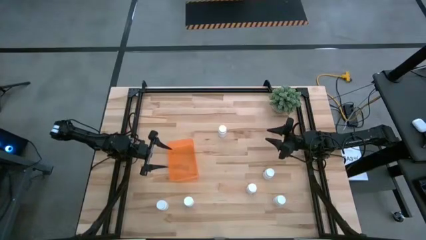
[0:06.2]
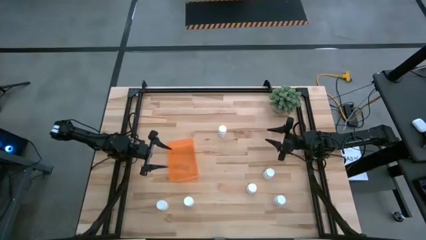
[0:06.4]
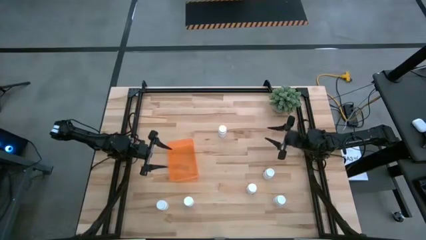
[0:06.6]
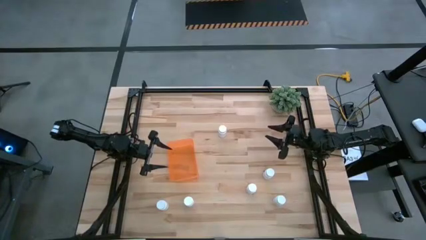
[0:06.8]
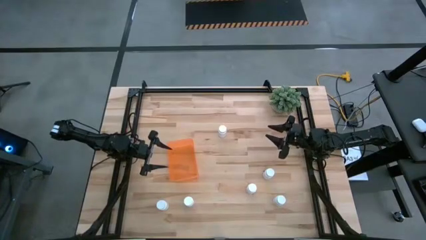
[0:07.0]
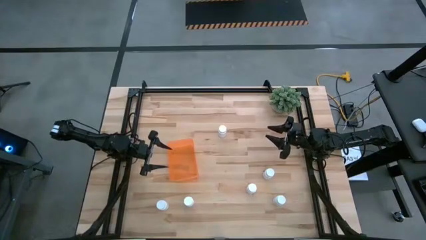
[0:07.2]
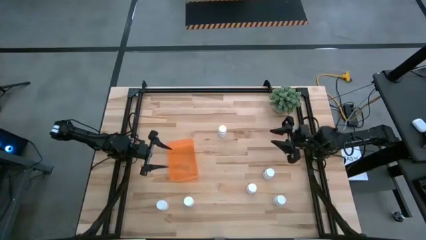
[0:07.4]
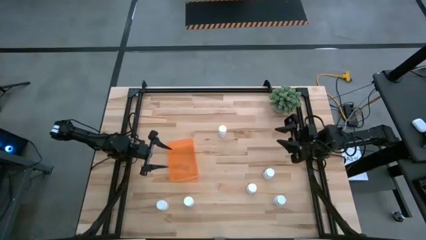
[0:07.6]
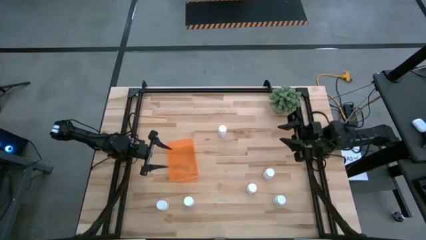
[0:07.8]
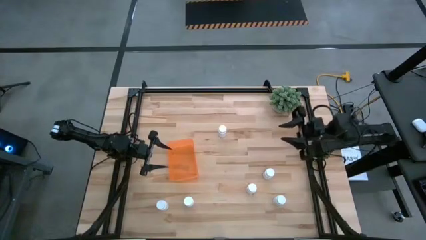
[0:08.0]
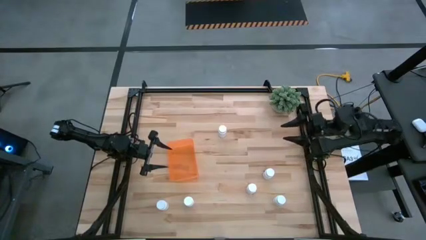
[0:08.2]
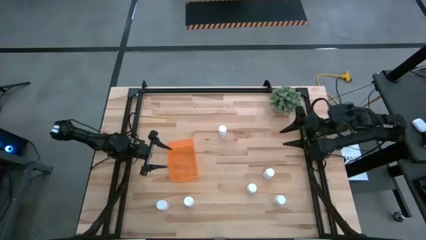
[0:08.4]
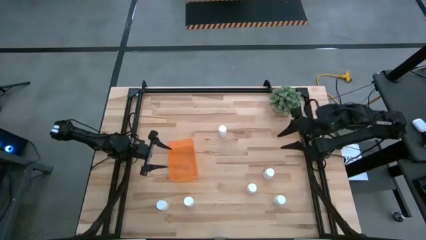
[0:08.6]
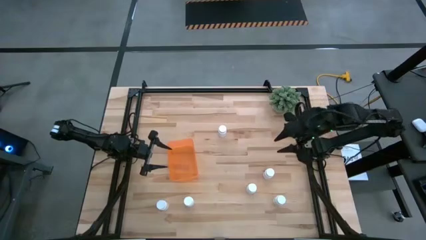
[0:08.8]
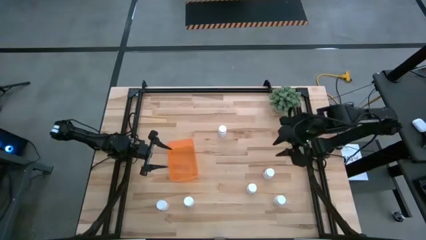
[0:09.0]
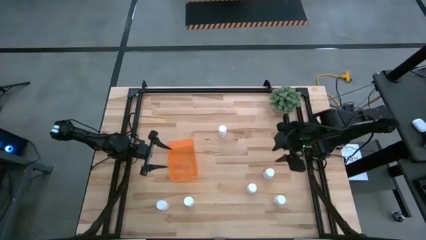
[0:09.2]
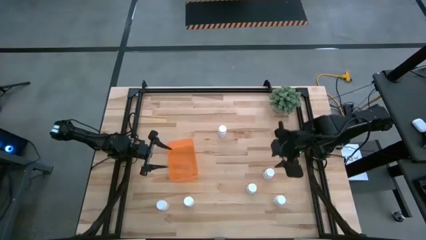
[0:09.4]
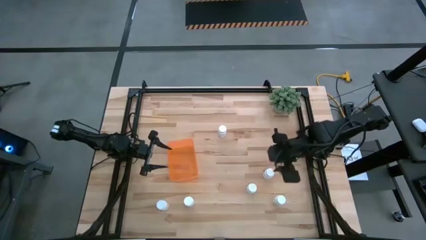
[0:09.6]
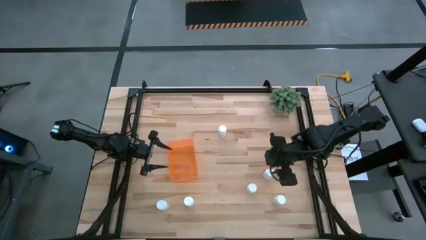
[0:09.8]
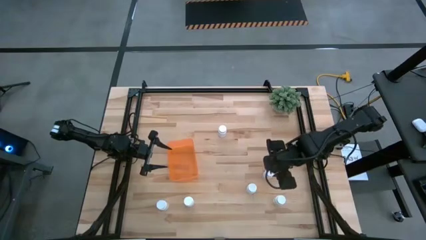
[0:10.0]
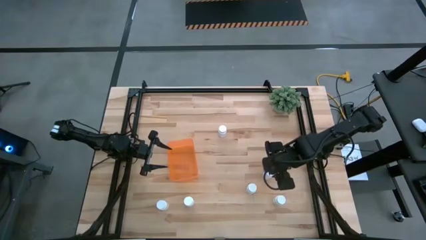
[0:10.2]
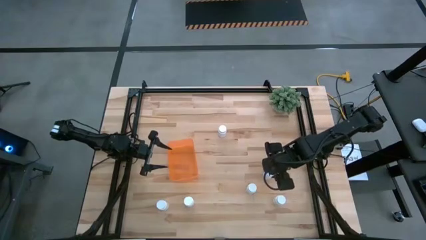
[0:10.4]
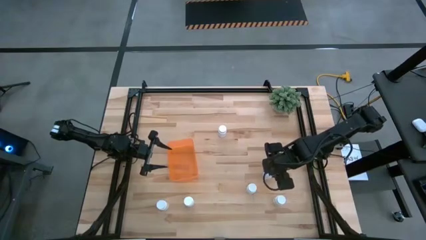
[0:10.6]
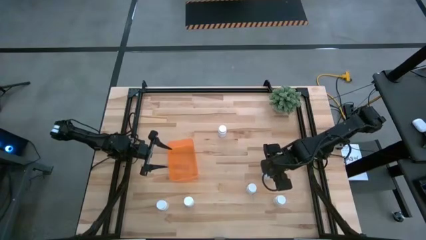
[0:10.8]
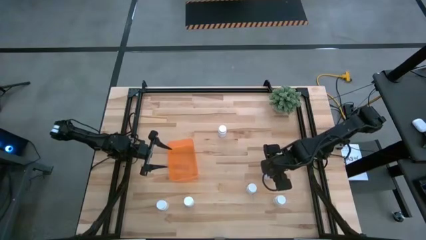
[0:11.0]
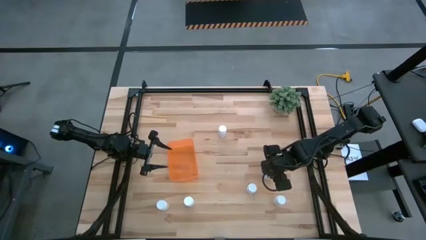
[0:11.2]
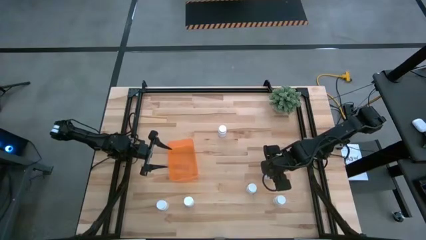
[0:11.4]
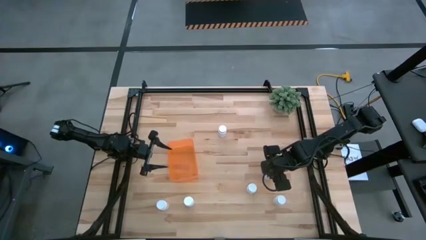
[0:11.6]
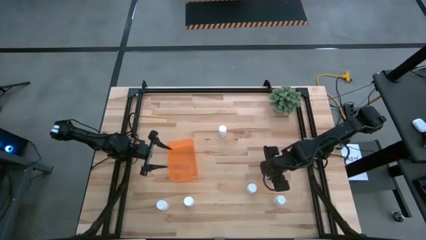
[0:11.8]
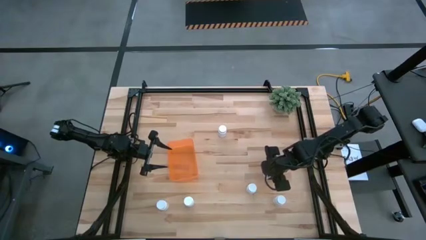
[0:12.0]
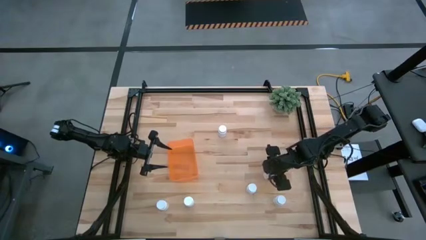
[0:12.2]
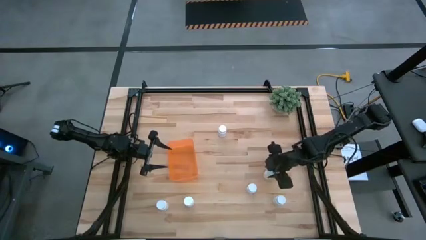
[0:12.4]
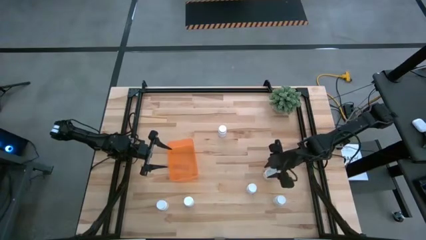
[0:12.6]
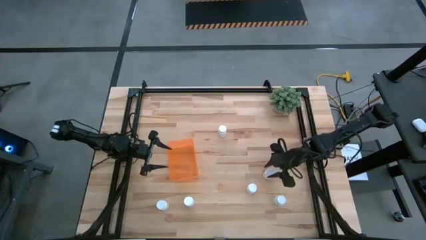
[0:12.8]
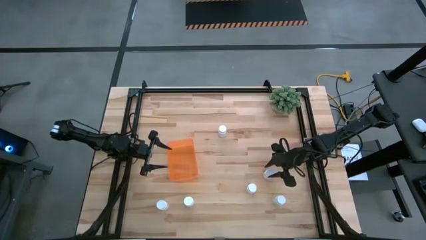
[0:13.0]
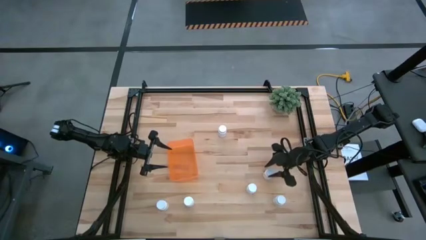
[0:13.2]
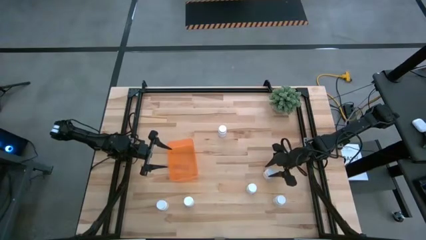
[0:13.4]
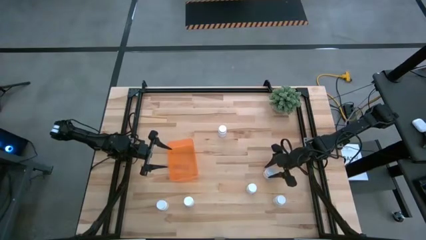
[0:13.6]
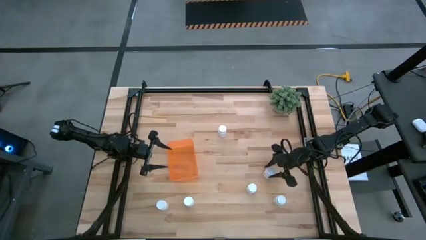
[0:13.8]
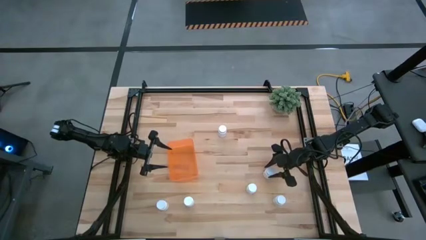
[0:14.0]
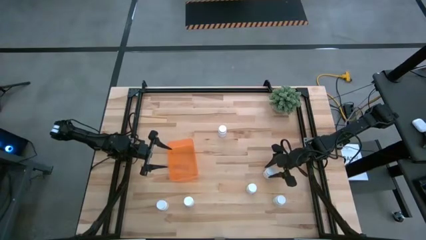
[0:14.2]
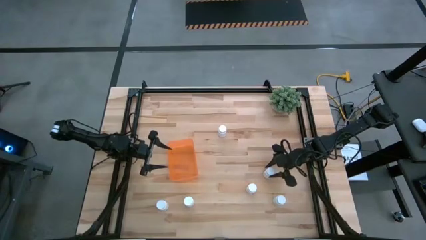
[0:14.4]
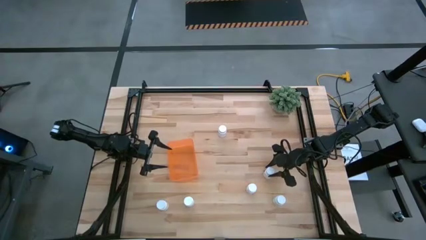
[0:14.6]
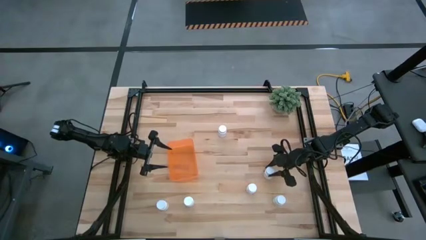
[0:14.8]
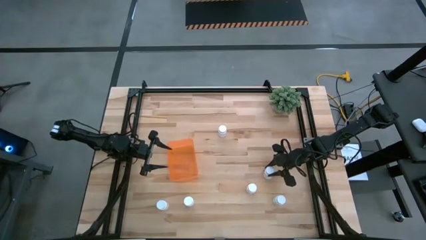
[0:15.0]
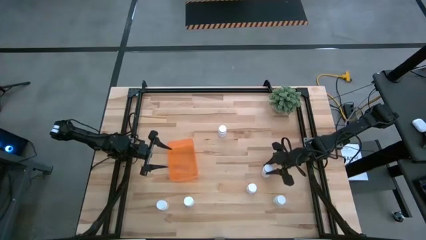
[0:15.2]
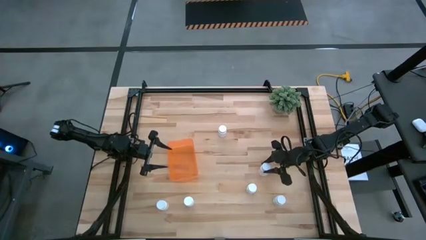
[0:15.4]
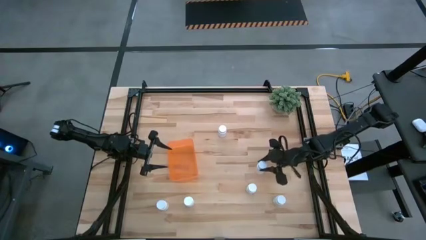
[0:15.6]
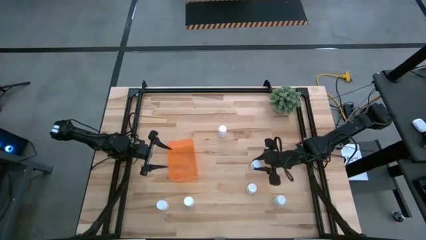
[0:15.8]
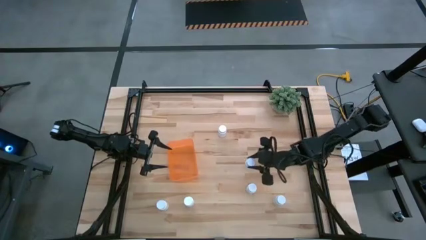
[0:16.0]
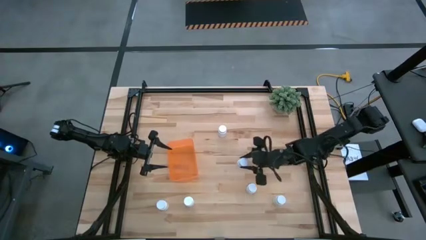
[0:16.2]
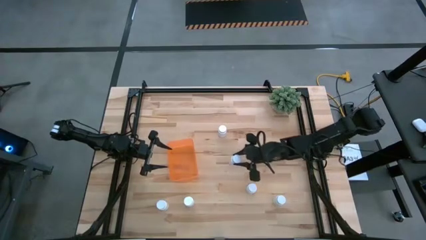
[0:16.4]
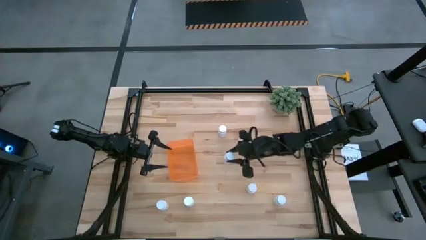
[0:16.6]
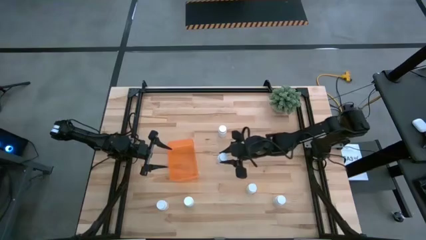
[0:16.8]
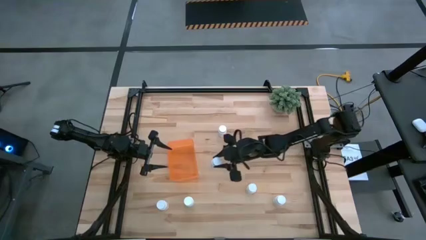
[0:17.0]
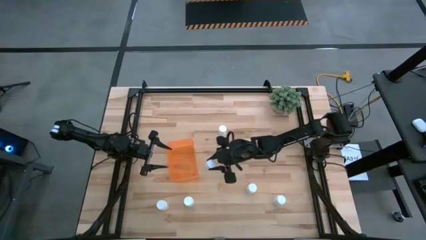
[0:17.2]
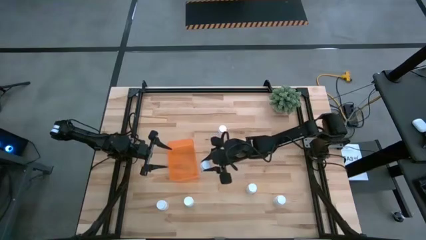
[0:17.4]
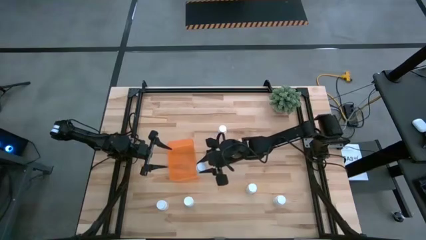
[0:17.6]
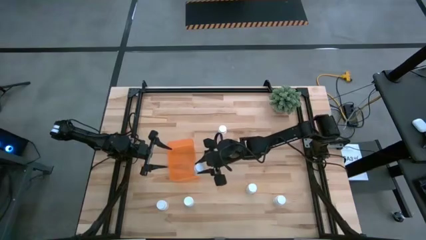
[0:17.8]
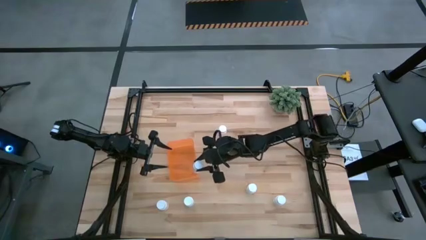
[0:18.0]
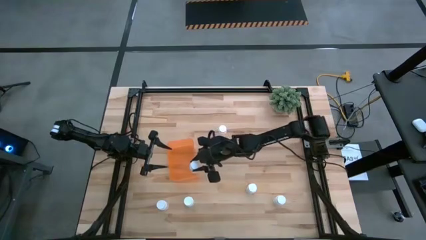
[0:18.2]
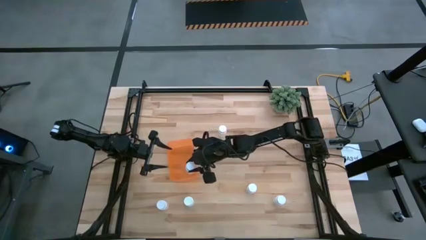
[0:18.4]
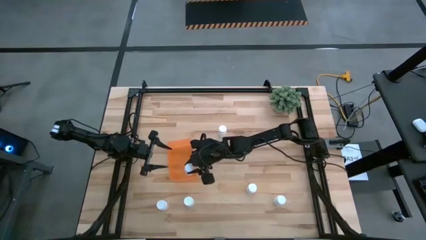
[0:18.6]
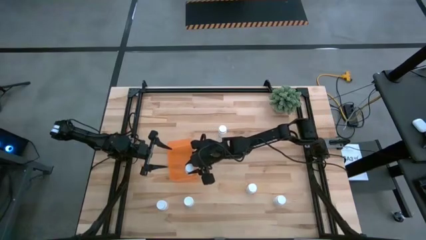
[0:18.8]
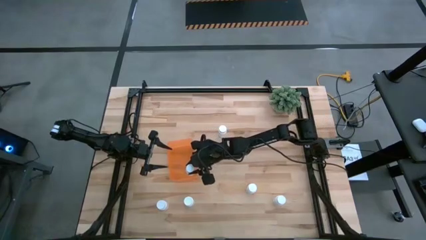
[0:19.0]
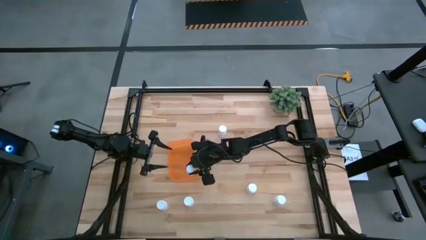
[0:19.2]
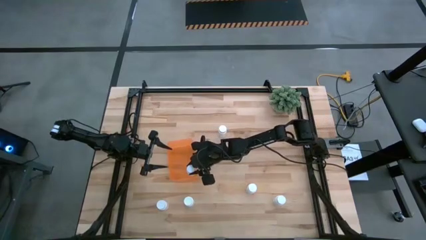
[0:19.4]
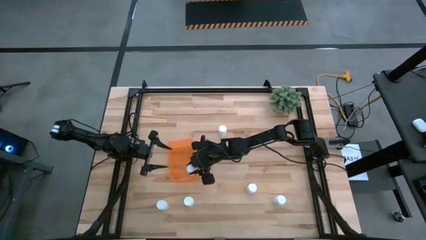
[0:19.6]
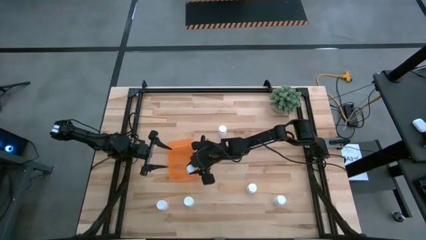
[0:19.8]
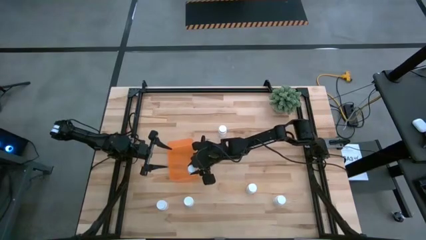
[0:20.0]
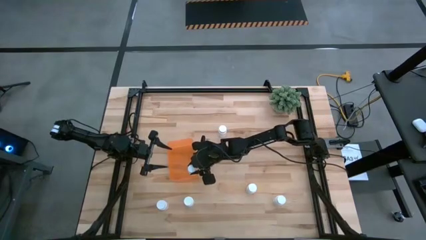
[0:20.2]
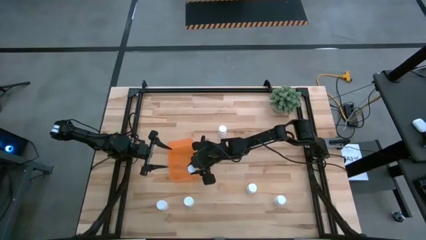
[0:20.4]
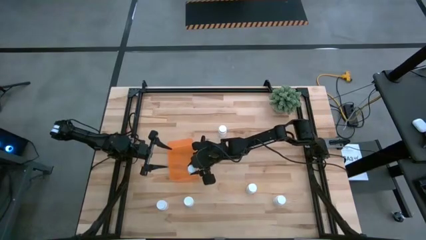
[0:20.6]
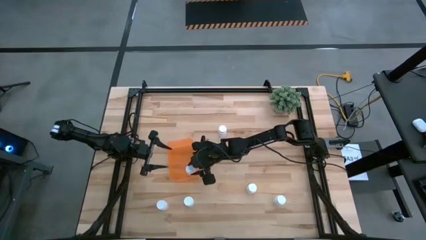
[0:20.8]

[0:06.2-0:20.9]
Task: Pick and place pill bottles into a basket
Put the white medicine bottle into the orange bin
